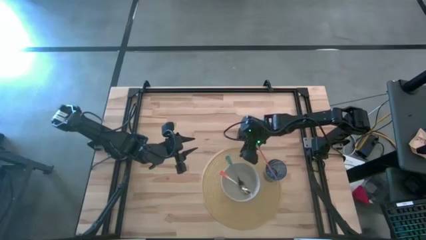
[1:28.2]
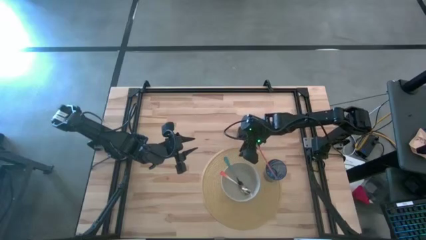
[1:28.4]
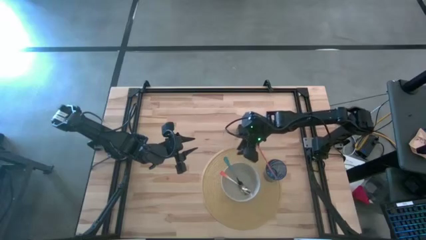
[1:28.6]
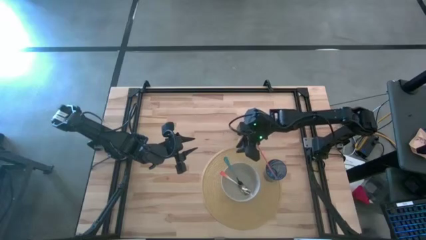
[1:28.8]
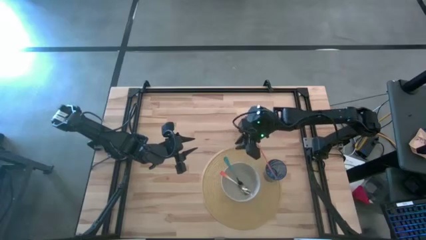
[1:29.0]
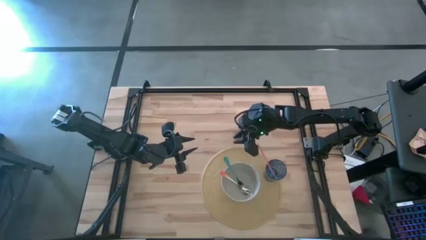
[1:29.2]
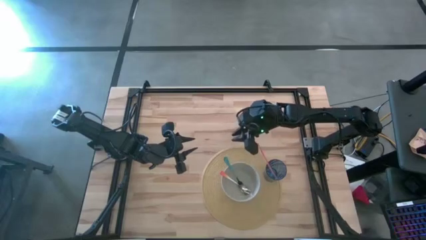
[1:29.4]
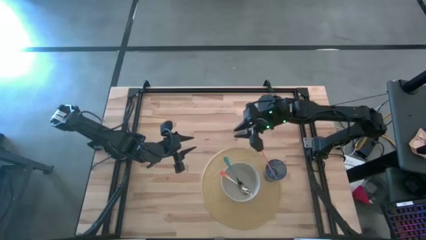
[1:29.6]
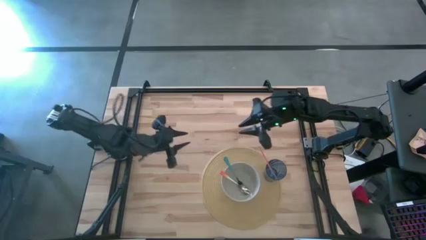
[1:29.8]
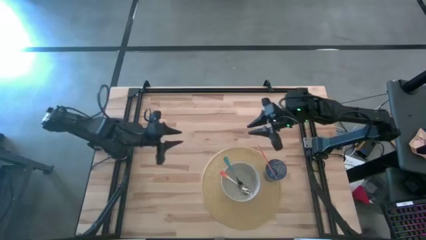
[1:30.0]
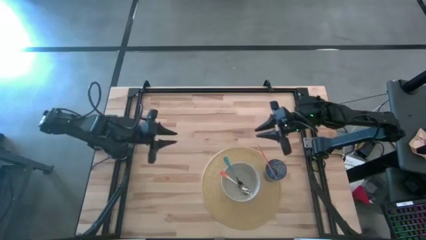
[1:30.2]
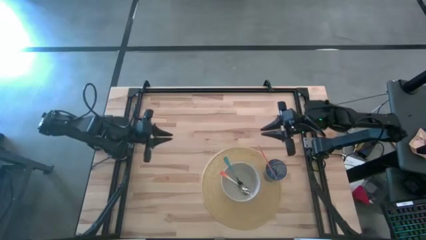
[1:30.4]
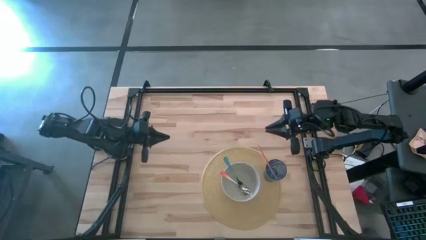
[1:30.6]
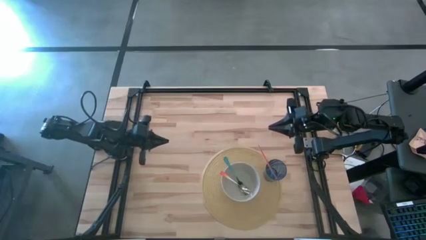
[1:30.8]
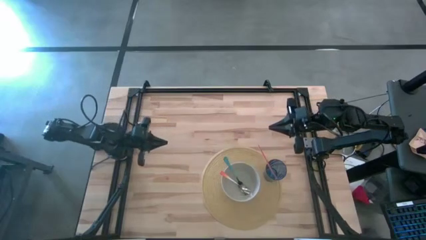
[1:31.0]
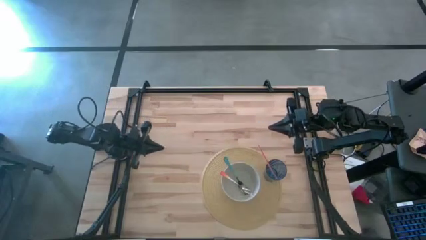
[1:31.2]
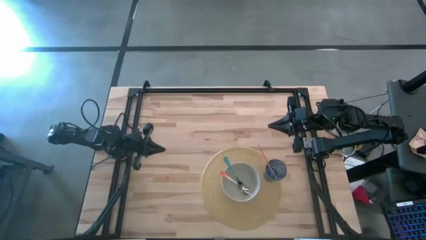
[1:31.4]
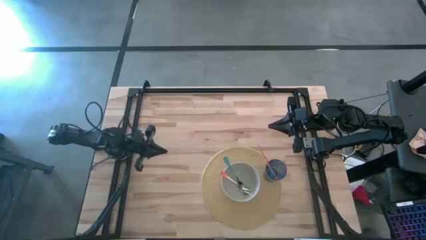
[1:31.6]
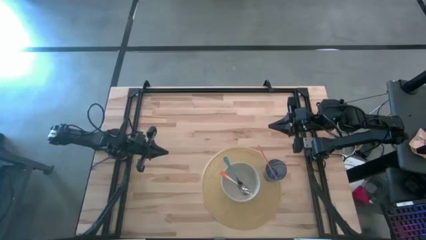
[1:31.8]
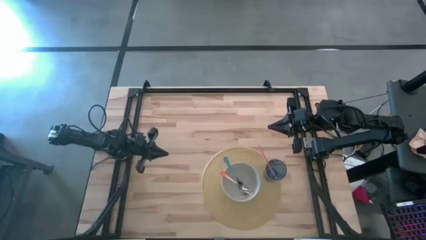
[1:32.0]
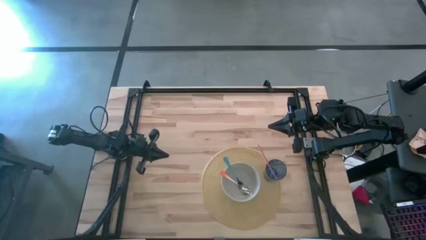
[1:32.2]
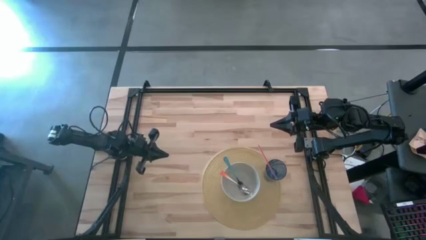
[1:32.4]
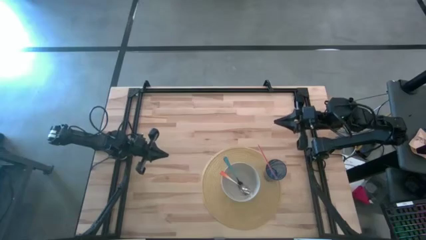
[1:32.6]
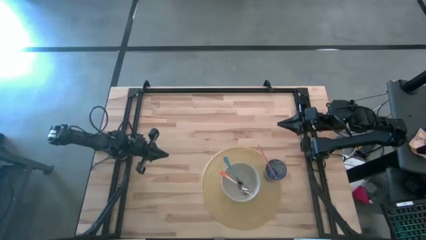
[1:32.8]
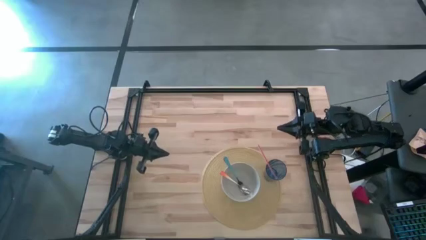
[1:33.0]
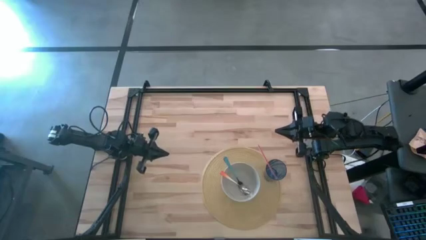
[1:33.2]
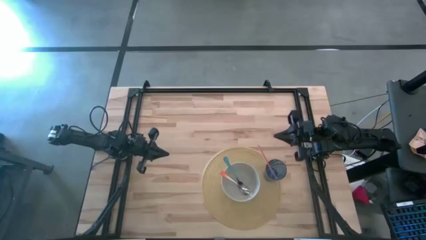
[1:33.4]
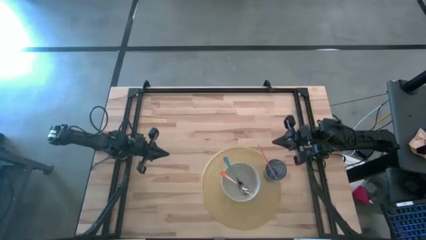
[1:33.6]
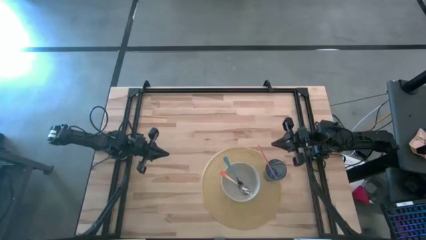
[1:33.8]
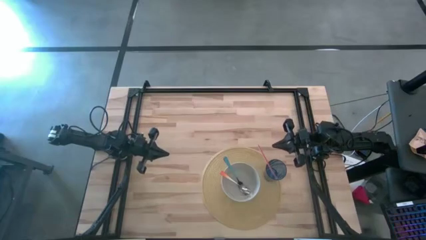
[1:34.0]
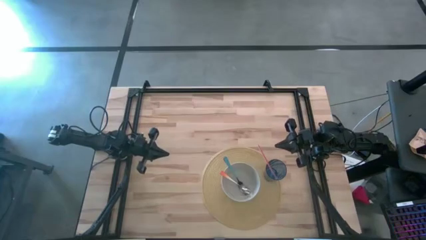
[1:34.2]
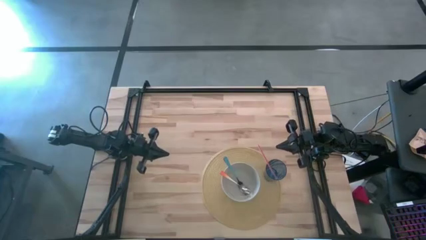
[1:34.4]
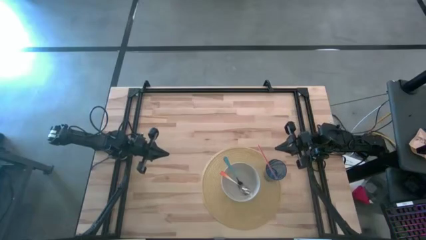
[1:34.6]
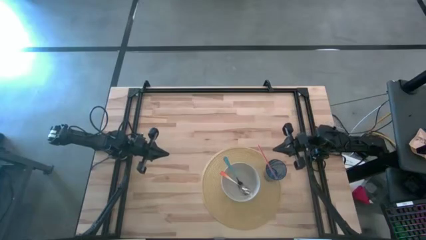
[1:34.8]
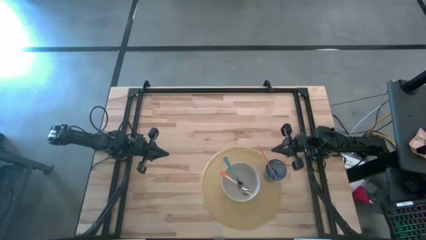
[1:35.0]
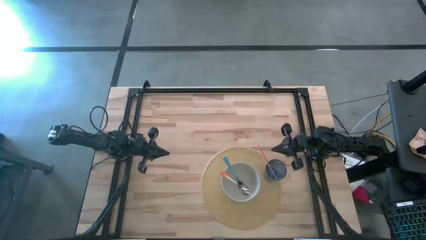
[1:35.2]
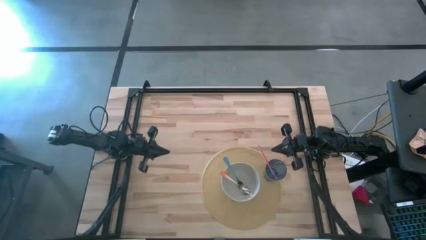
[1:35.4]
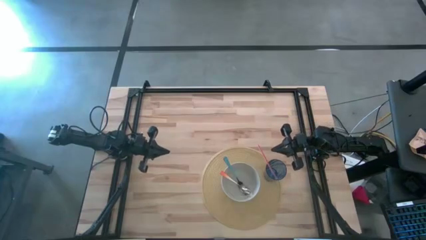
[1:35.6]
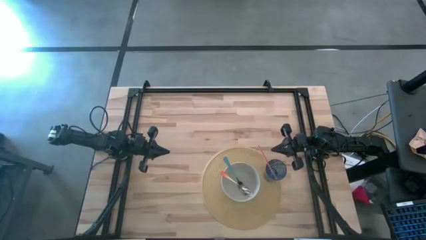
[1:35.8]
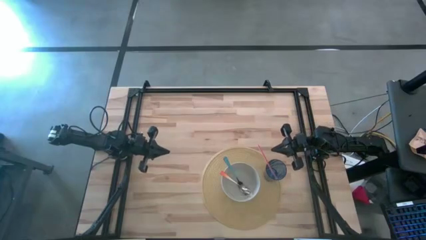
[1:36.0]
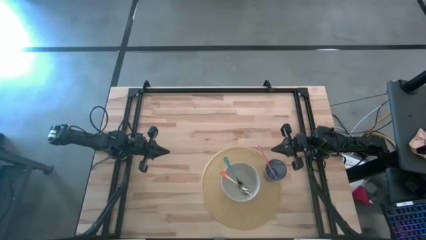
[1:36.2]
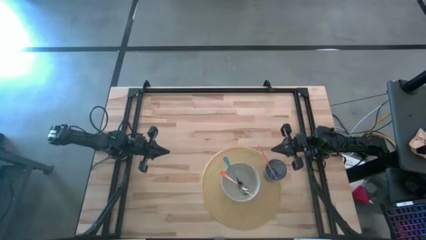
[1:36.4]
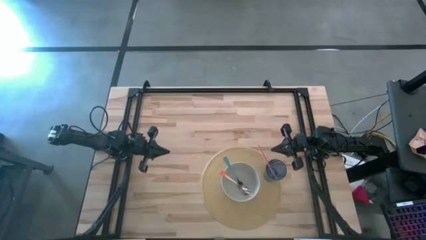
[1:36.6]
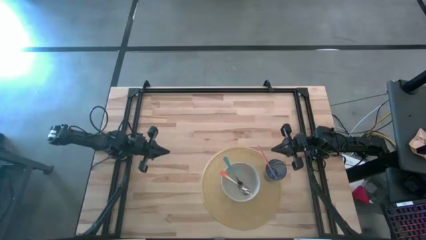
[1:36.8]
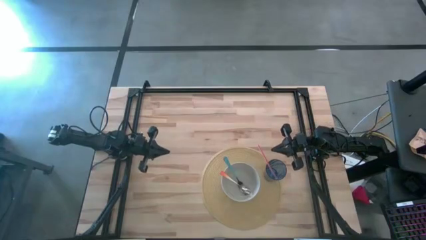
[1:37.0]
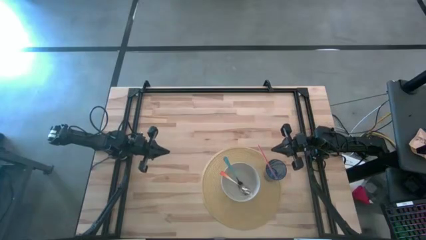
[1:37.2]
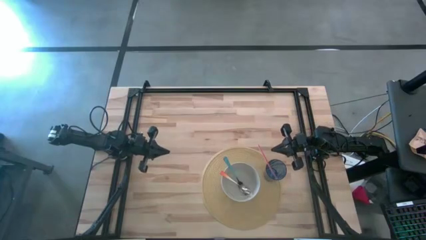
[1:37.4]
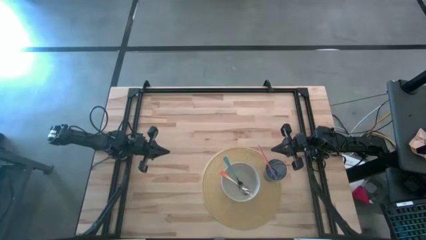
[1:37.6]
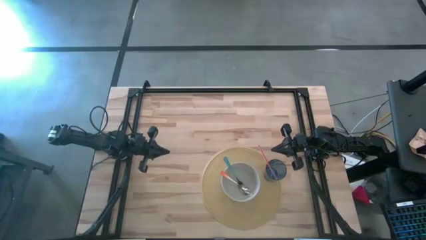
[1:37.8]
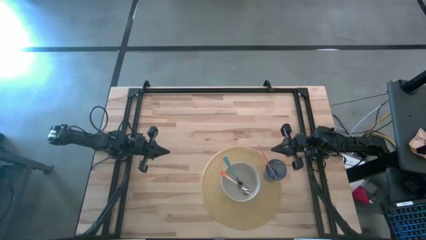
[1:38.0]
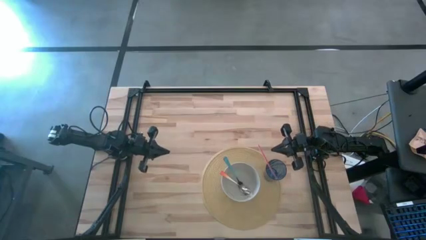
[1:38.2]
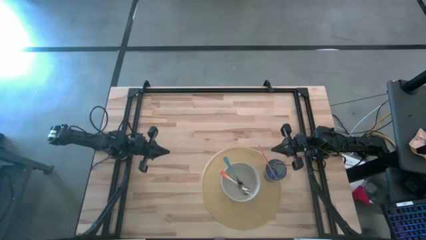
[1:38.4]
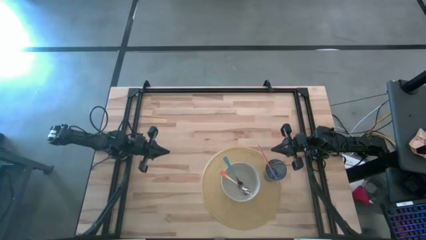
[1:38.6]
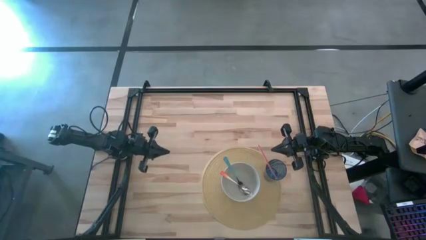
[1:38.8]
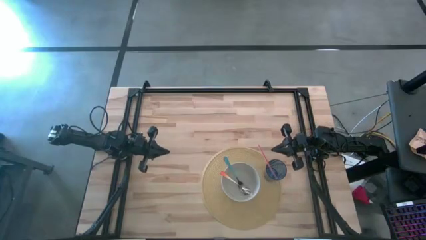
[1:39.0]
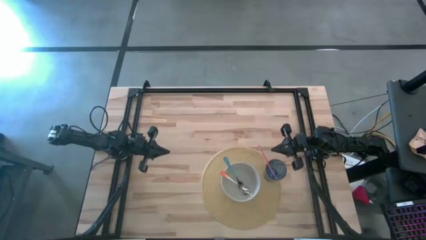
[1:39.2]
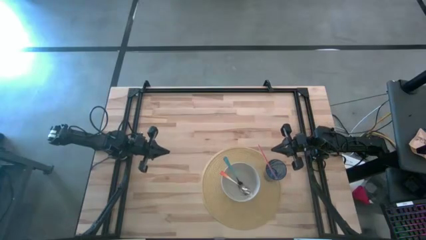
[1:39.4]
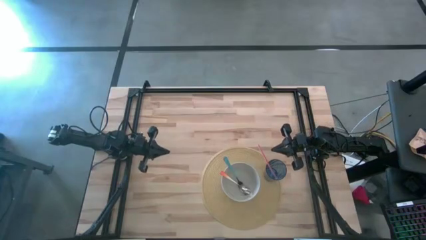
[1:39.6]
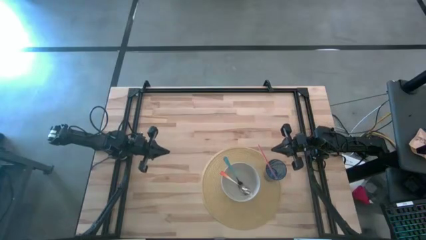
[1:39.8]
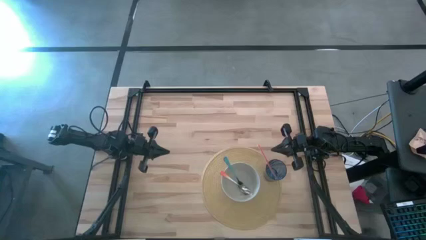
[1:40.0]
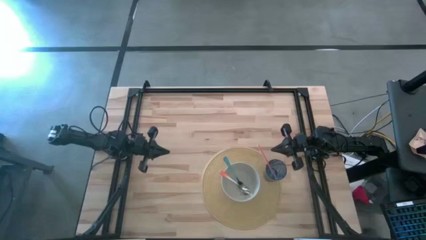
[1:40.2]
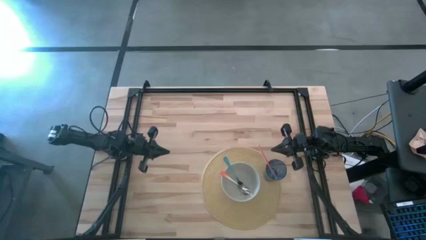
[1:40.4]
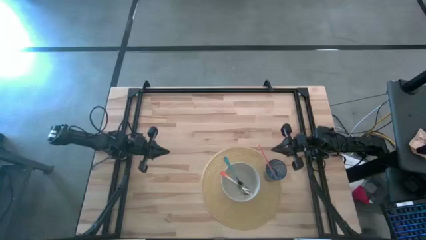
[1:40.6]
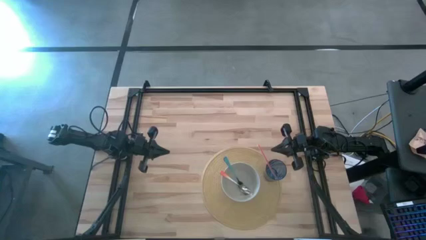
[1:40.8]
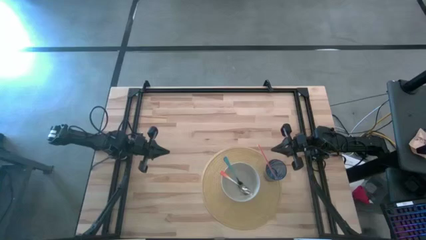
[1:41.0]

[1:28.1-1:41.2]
Task: Pick & Place Utensil
Return to Home Position

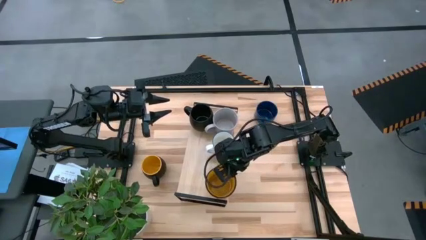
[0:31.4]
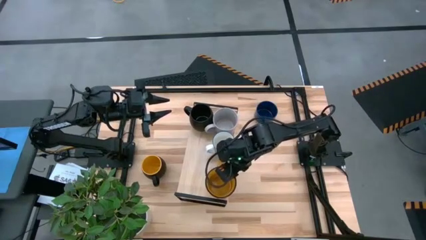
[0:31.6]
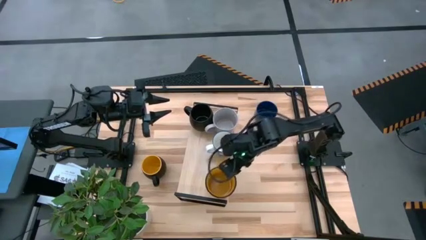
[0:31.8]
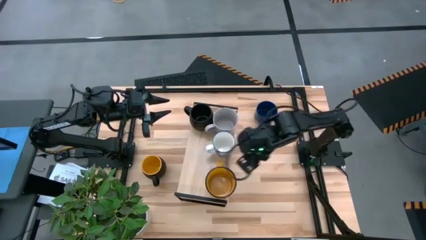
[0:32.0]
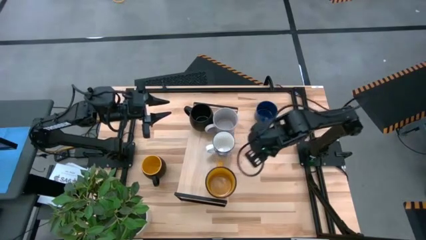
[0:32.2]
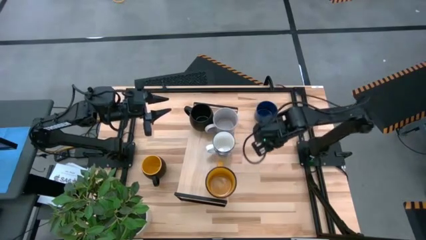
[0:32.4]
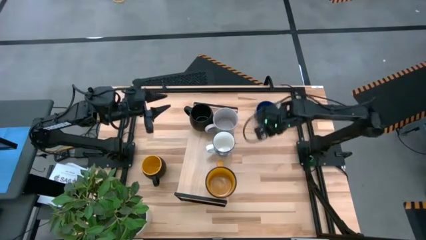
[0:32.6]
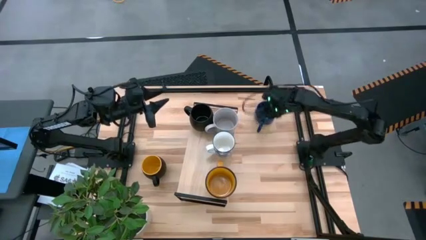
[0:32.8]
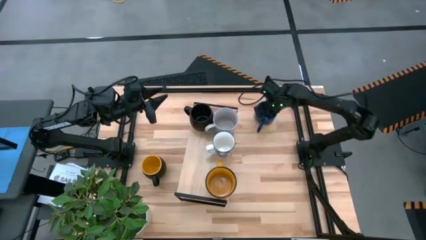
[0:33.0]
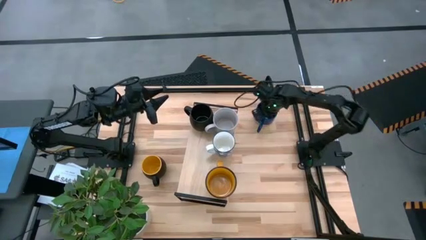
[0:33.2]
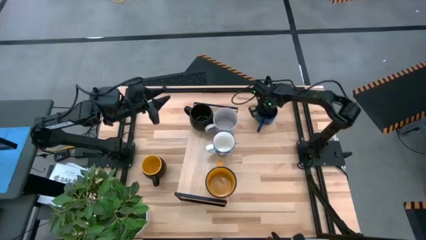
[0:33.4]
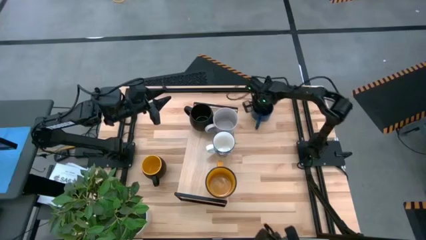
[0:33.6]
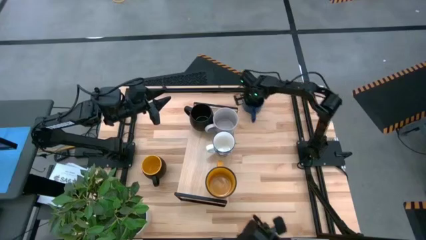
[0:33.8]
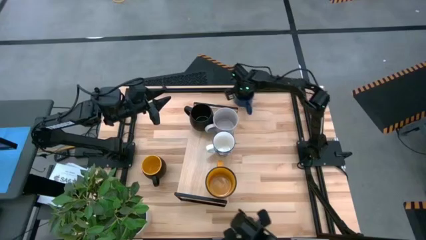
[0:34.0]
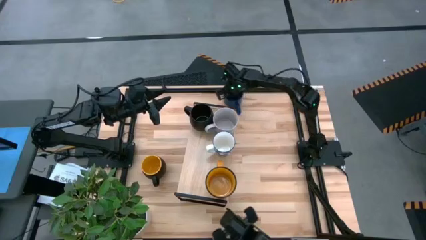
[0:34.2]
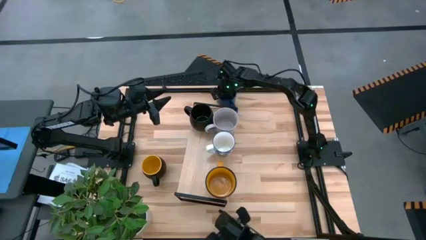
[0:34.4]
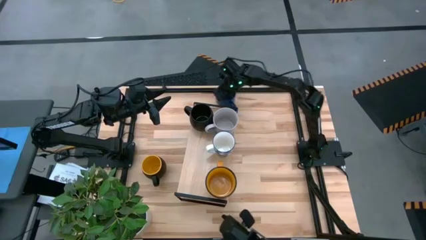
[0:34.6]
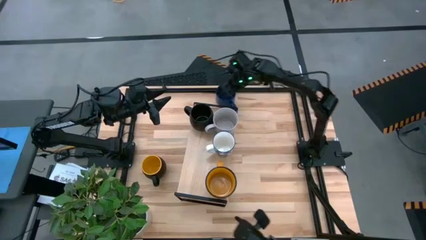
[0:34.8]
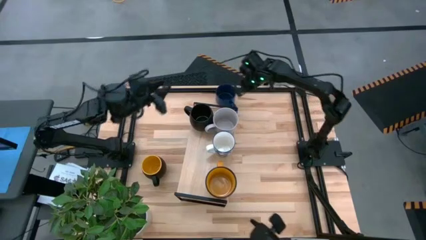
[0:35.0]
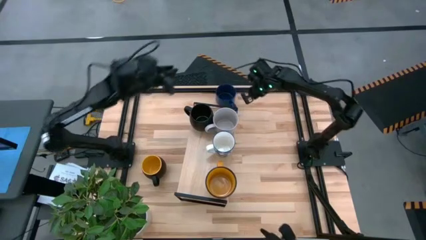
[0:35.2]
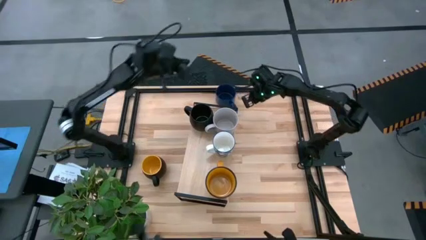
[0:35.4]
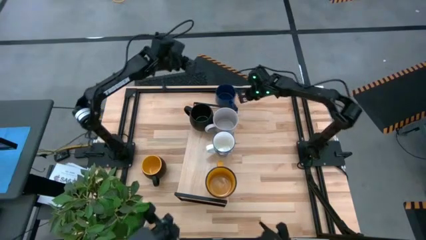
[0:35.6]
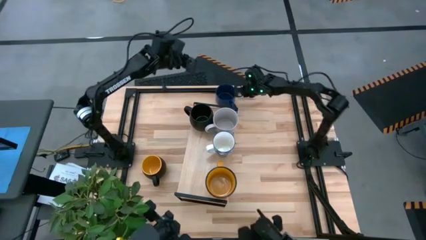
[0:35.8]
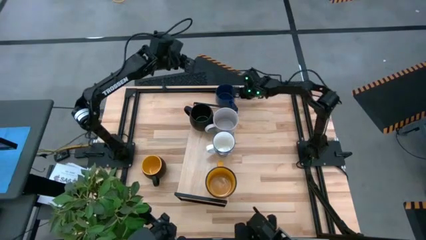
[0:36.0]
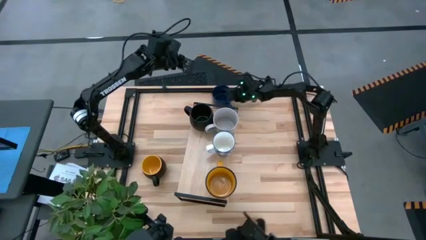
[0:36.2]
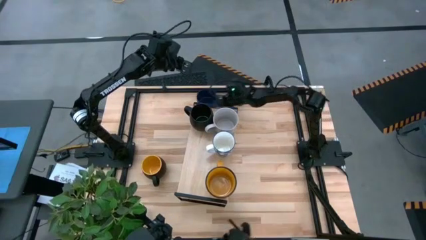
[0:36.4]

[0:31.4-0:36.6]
Task: Place coffee mugs
Put the blue mug on the shelf
